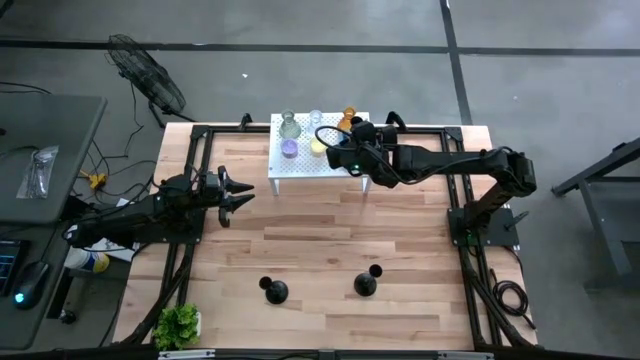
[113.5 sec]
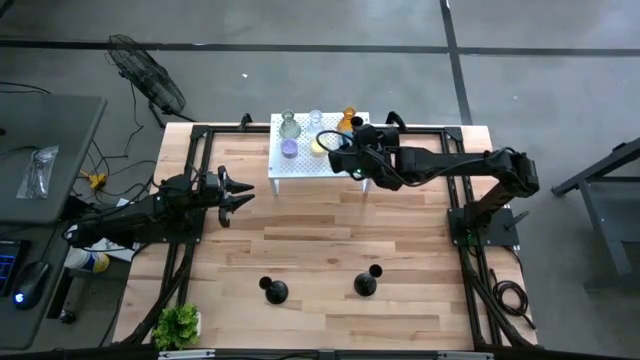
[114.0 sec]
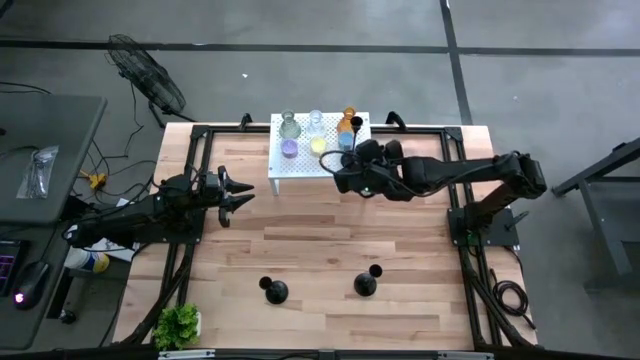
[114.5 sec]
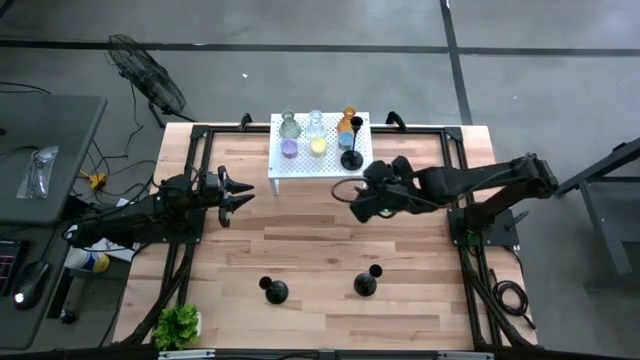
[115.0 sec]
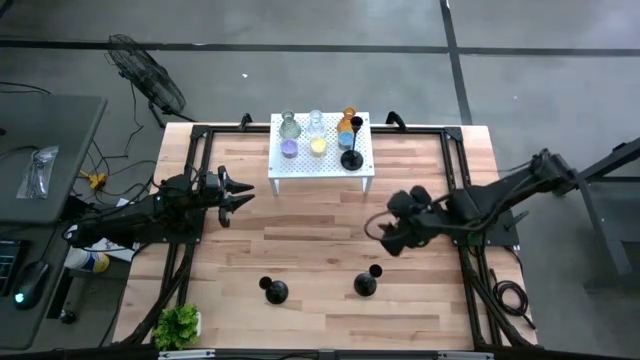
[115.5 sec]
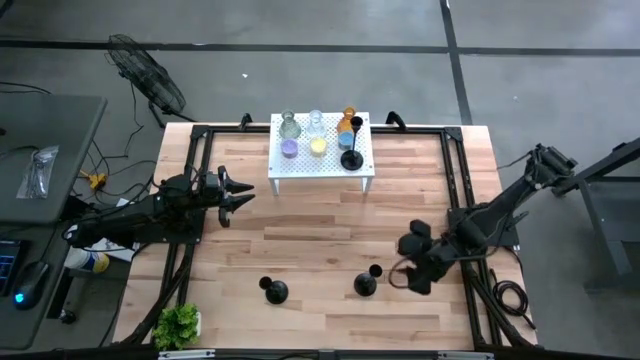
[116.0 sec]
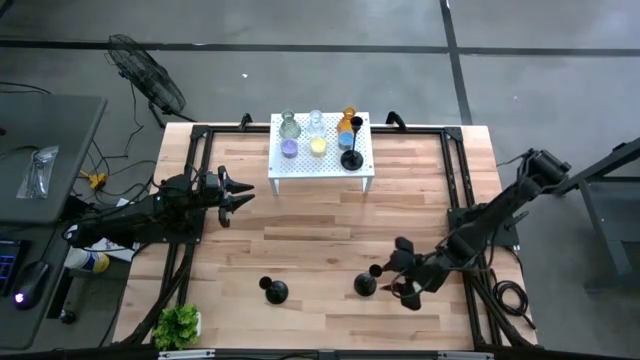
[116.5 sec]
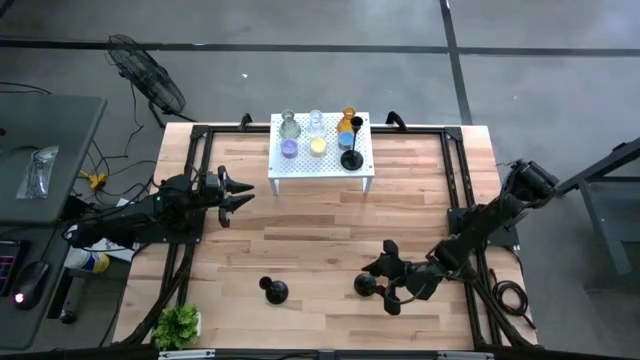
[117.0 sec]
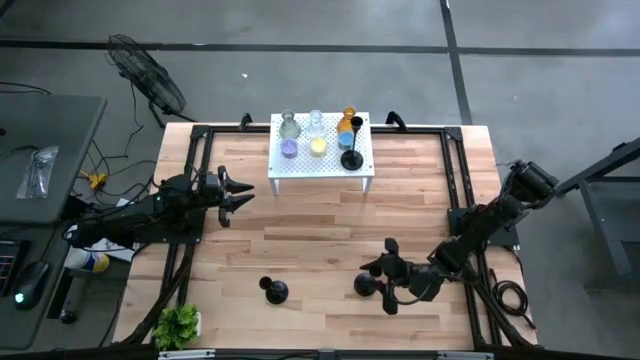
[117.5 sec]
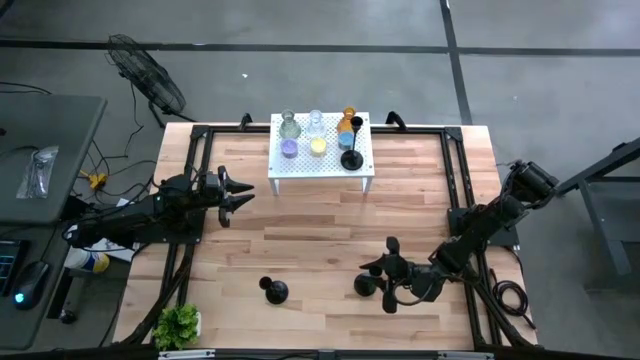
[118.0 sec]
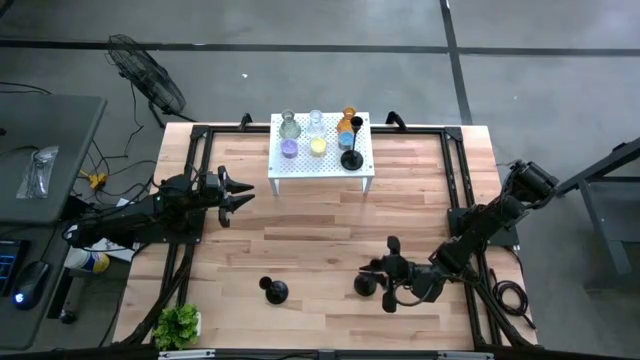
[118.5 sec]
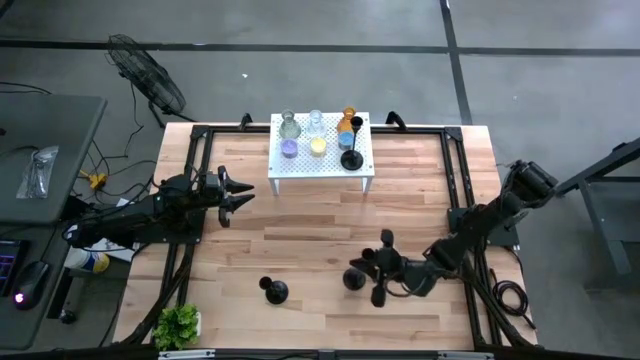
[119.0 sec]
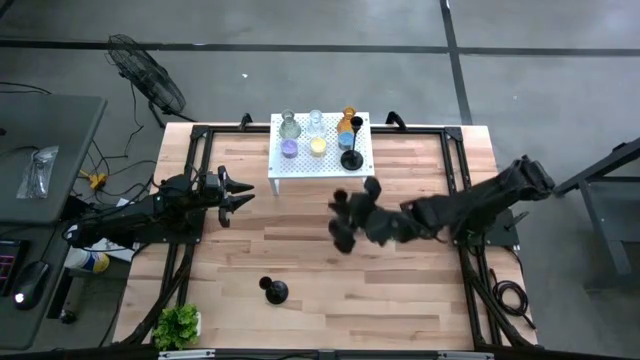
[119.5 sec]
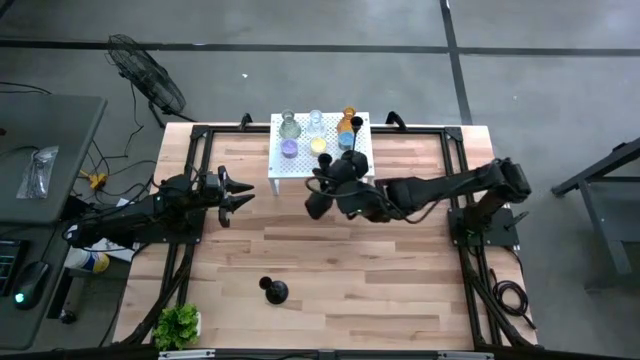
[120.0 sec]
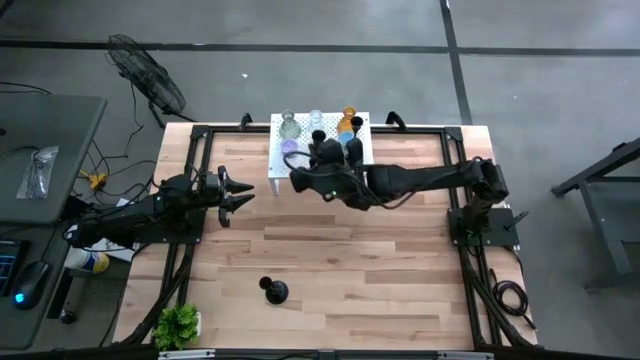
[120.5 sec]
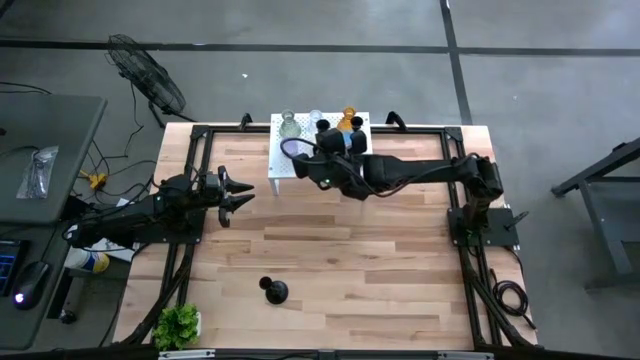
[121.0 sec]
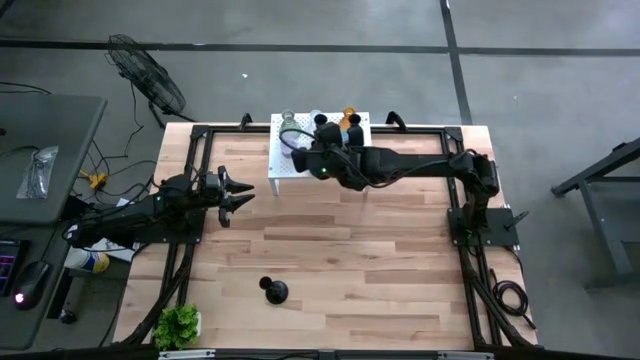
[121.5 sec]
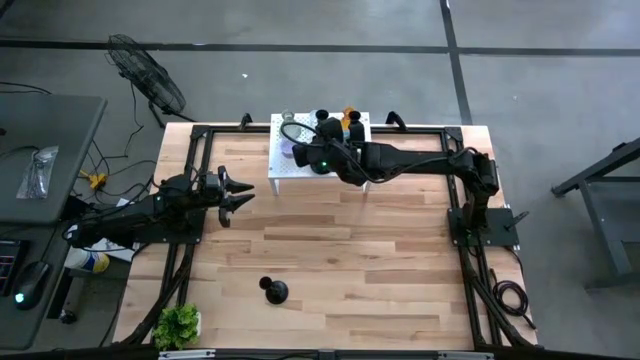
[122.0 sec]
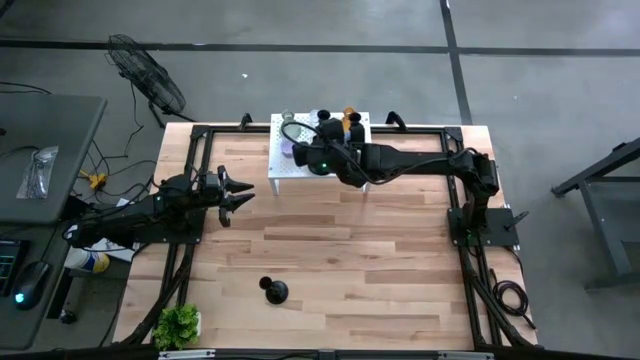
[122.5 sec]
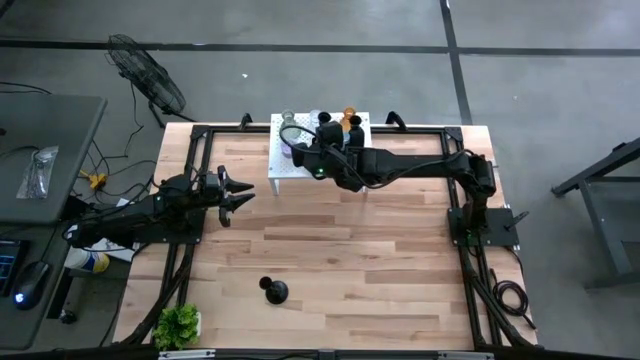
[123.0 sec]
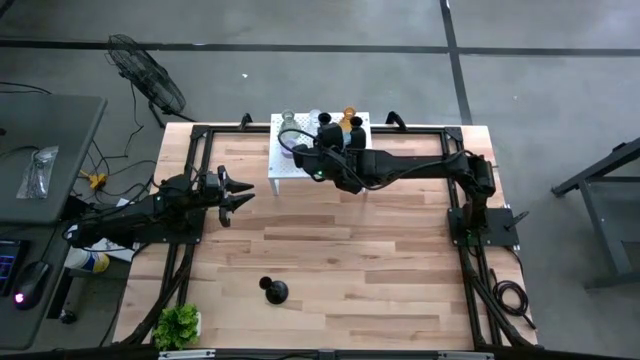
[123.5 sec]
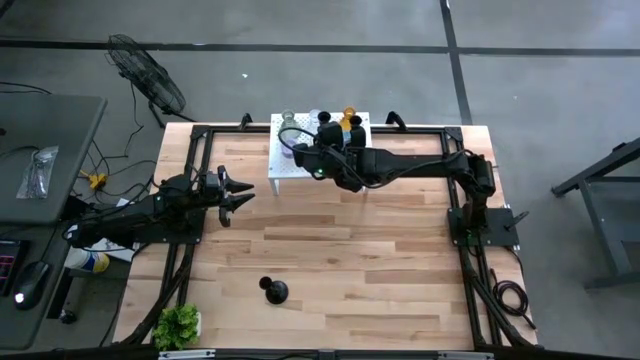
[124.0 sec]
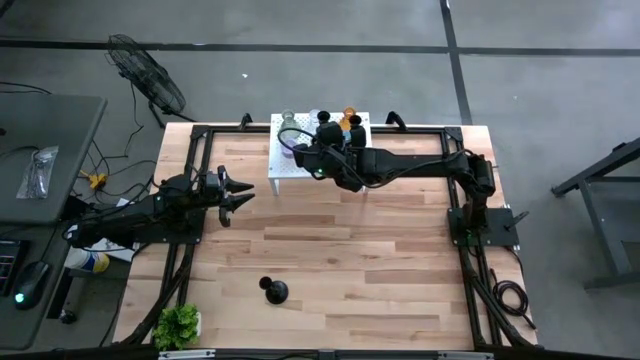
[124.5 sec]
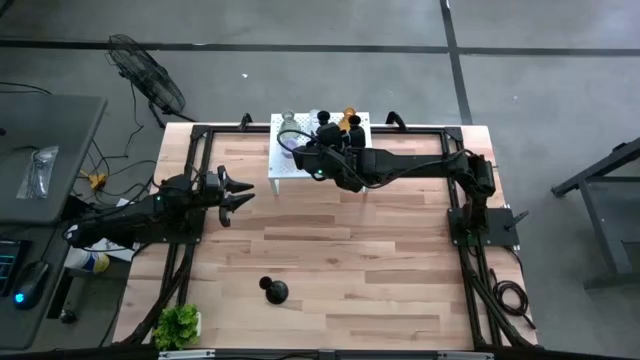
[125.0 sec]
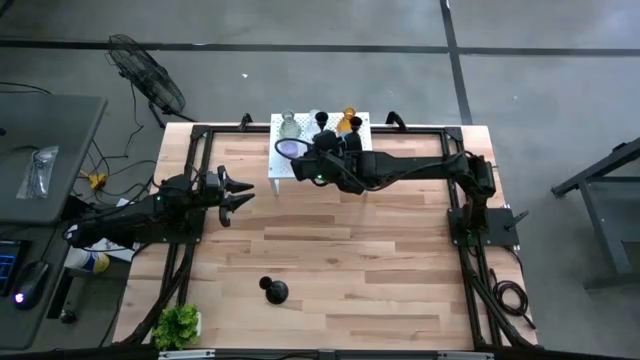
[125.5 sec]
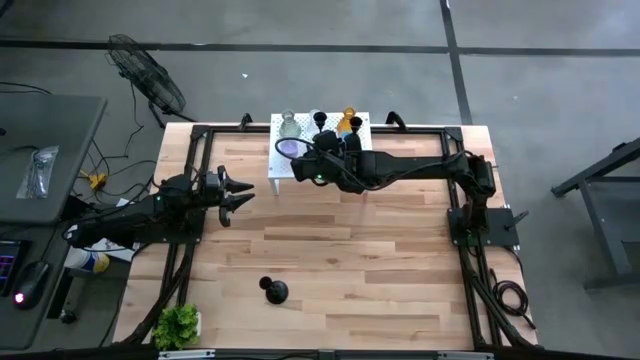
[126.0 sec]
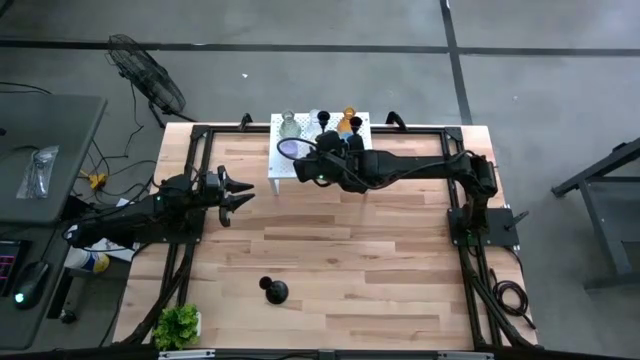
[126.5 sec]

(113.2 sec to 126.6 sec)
Task: Pick & Place candle stick holders
Put the right black candle holder on the shelf aligned with the other black candle holder

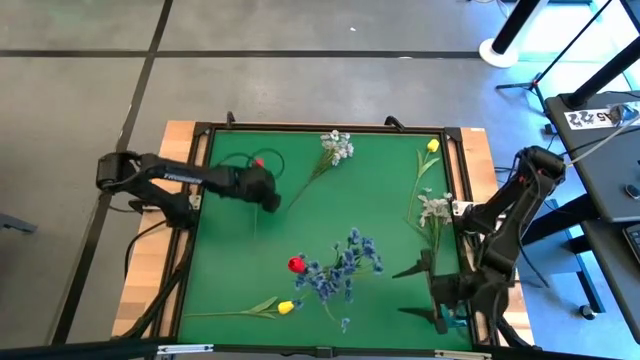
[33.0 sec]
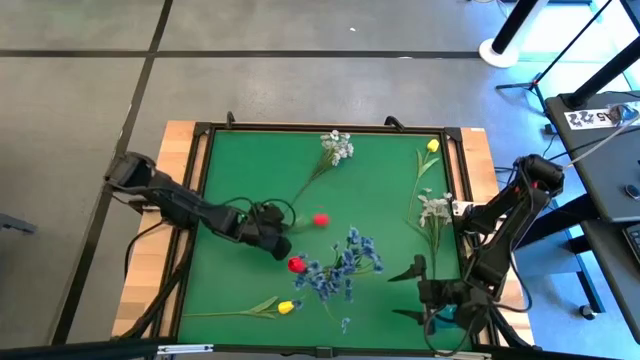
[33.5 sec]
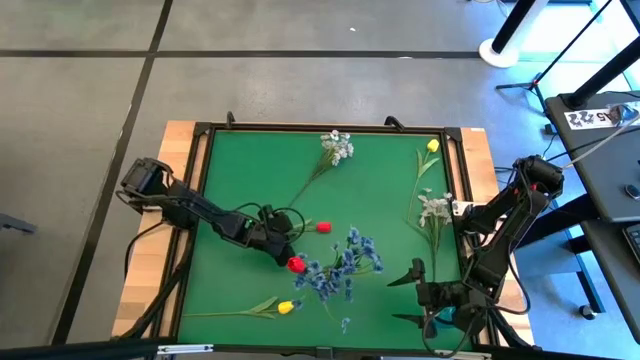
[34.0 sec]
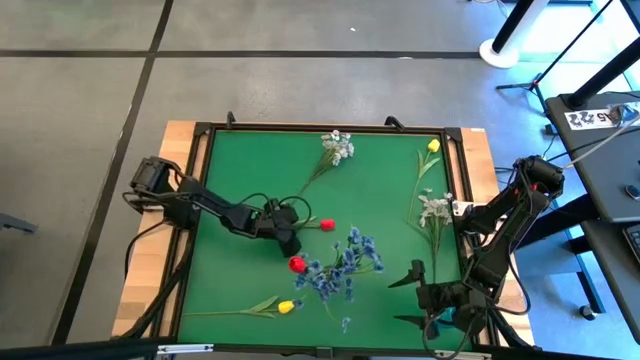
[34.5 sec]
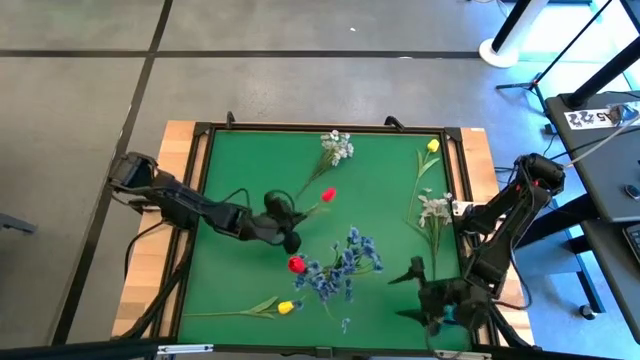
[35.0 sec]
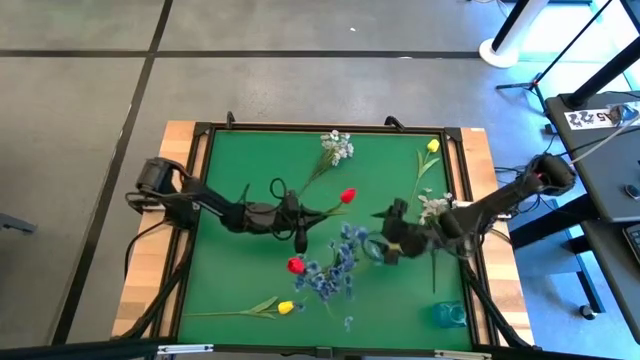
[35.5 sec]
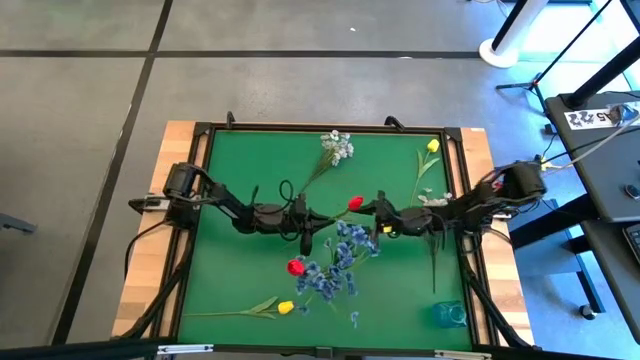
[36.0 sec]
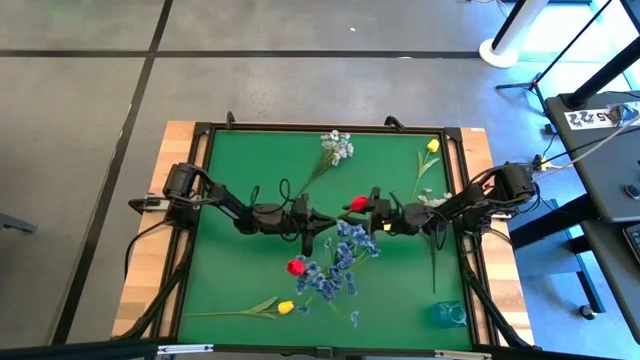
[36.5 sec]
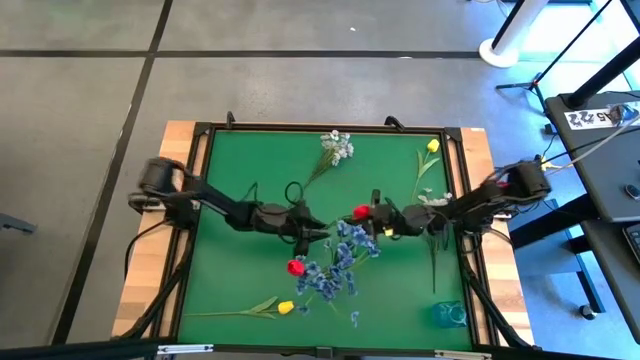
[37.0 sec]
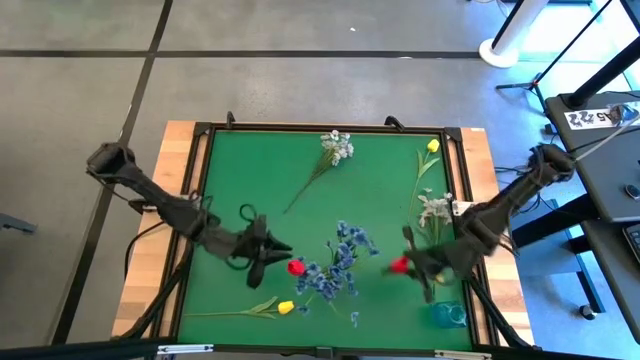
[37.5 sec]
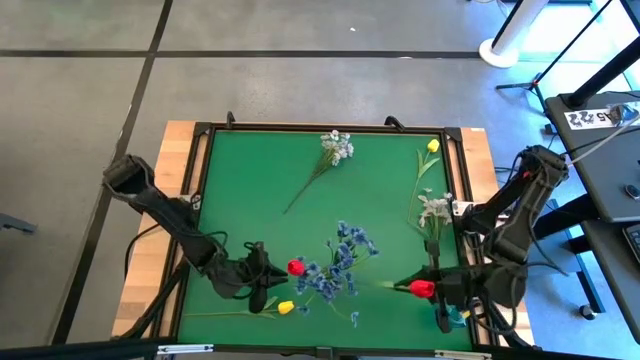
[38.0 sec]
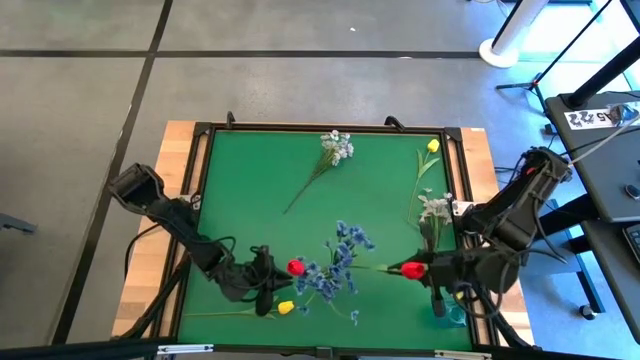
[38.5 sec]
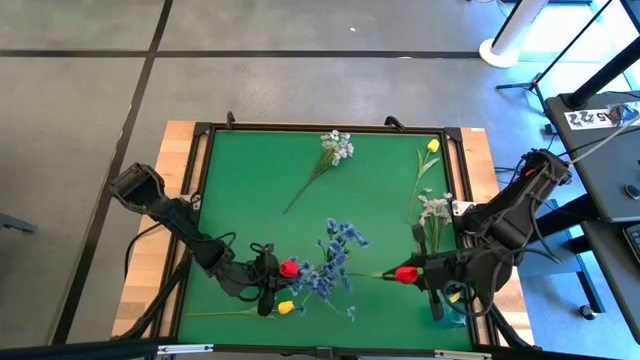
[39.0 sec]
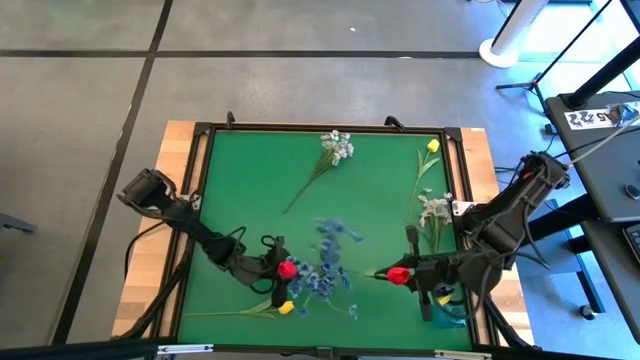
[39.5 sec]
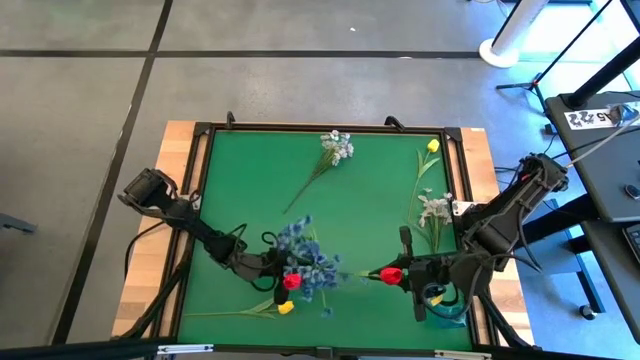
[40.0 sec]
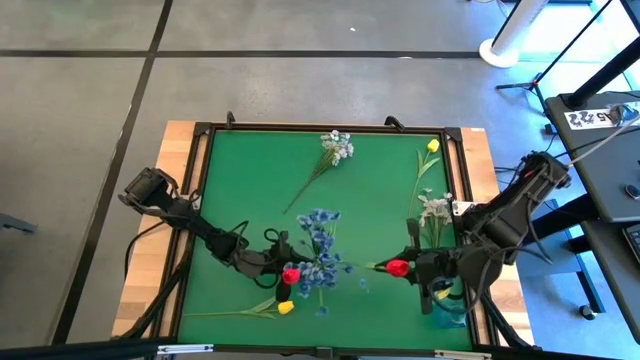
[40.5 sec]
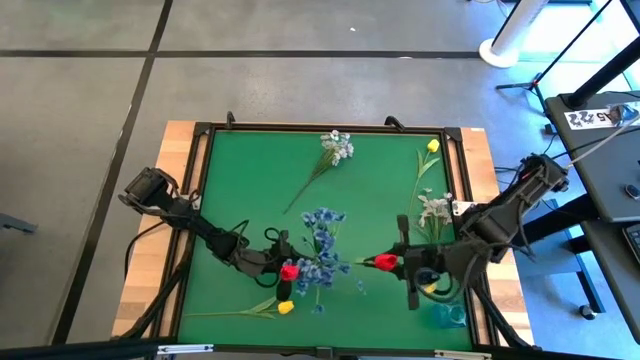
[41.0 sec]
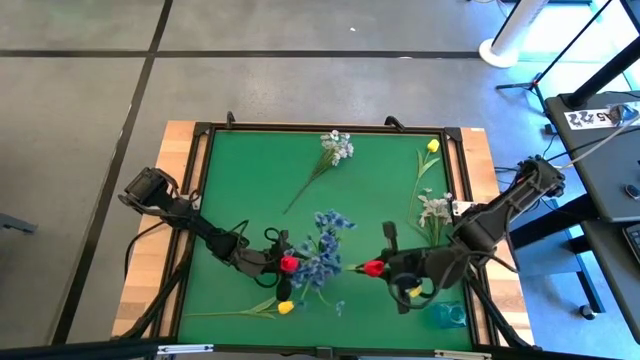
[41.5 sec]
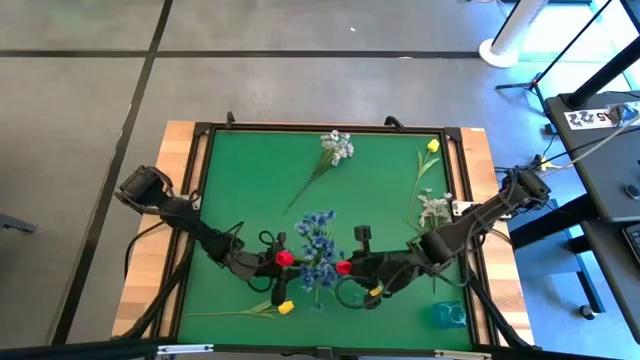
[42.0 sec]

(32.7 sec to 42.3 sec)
Task: Sort flowers into vase by color
Put the red flower into the violet vase
